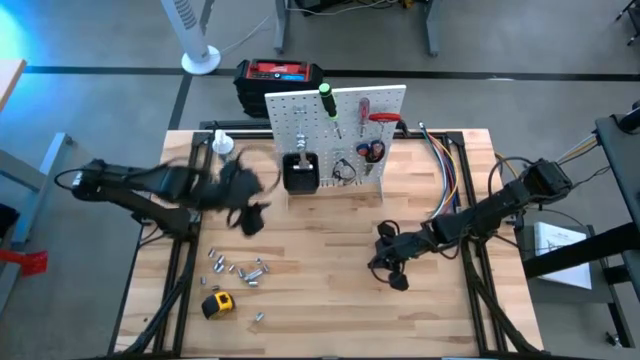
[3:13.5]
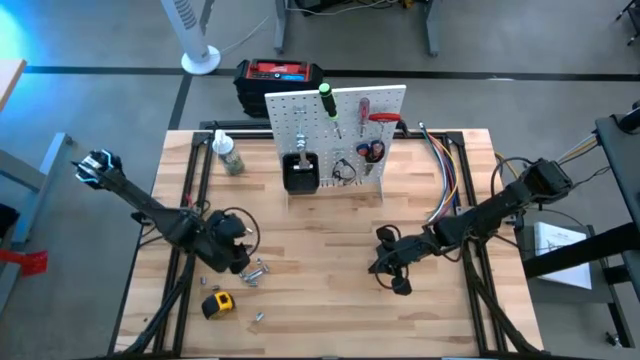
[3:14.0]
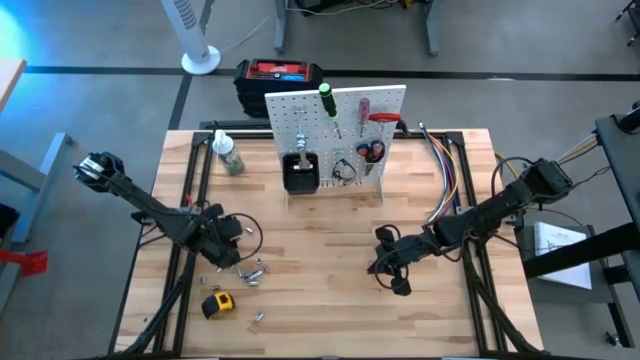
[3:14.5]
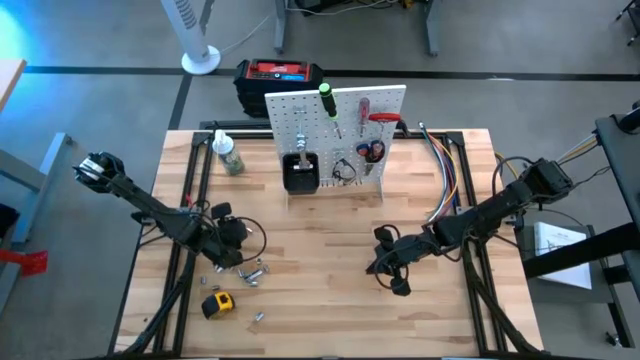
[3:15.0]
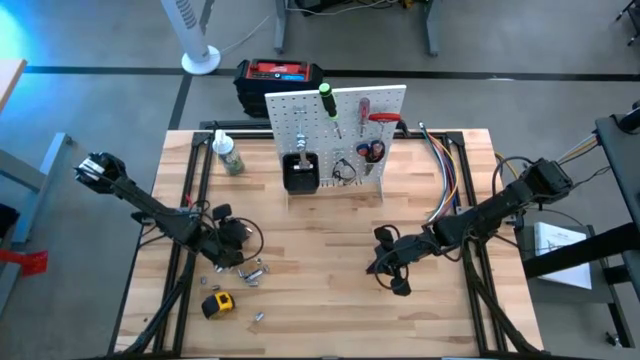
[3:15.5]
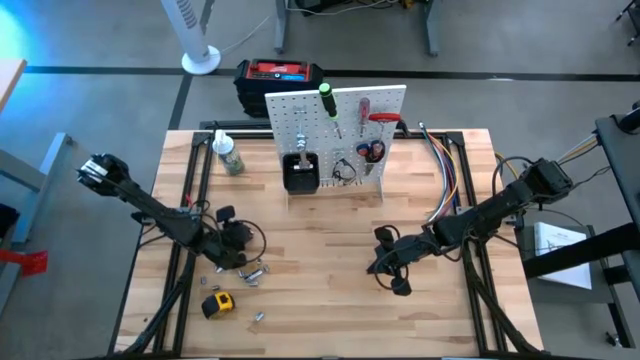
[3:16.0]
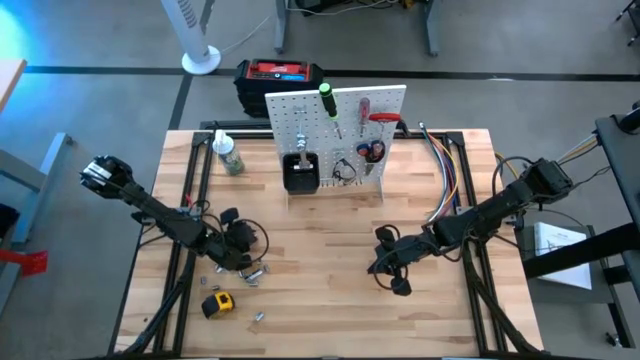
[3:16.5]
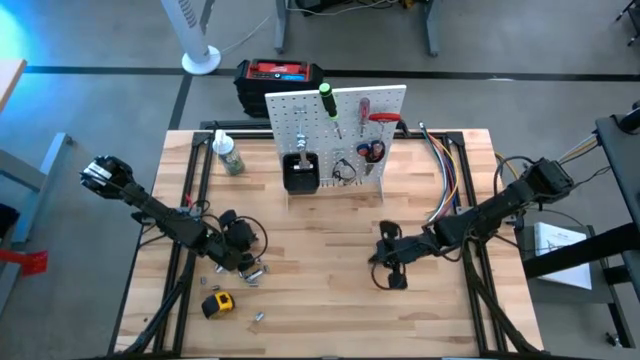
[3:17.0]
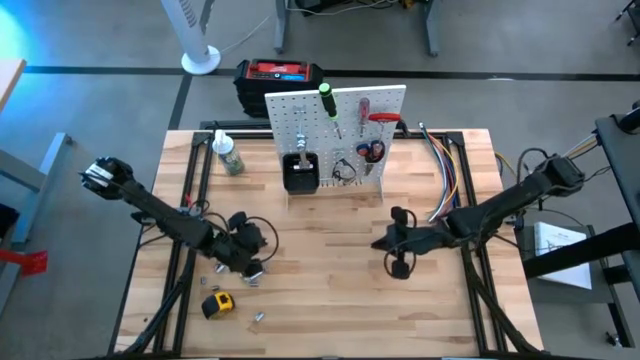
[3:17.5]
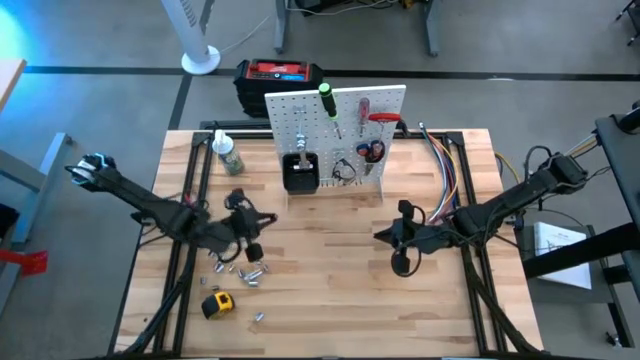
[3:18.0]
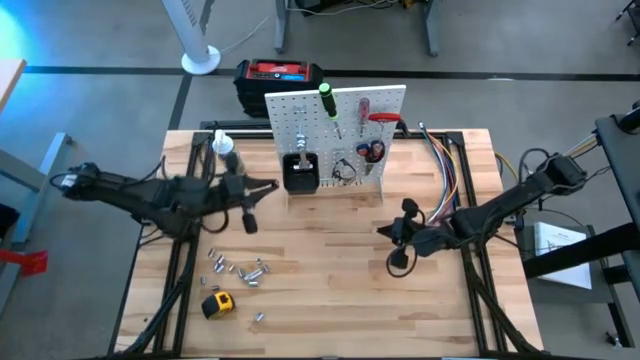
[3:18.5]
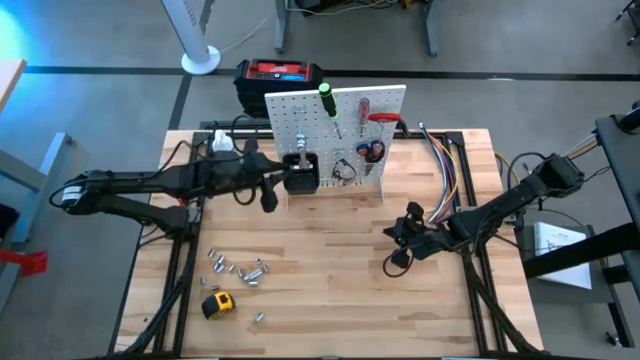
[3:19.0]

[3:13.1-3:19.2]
Task: Hang tools onto peg board
Put the silver socket into the black bin on the pegboard

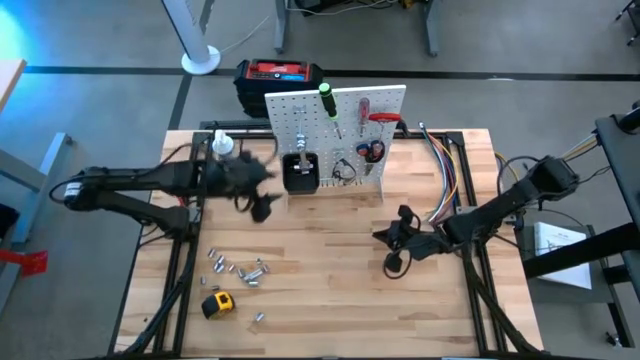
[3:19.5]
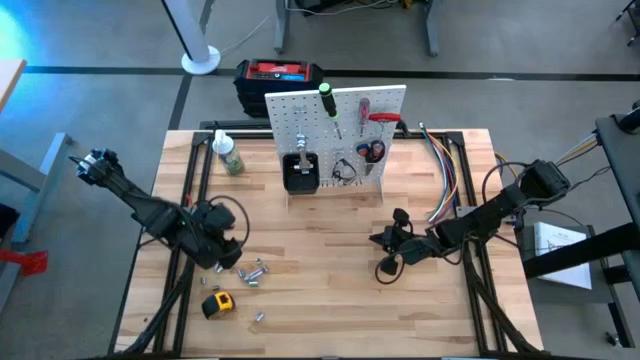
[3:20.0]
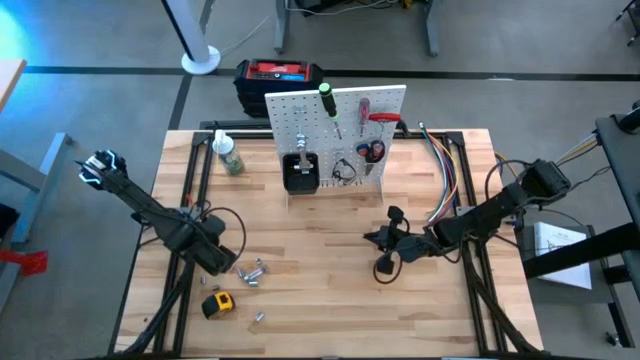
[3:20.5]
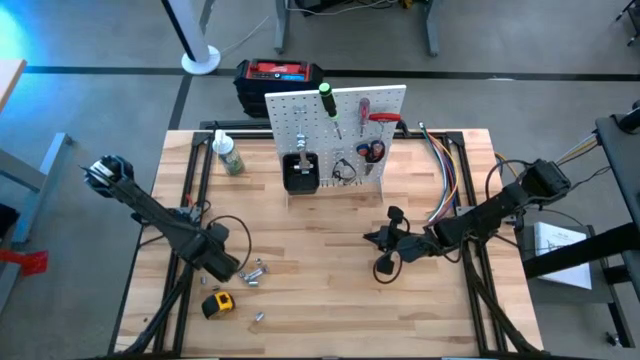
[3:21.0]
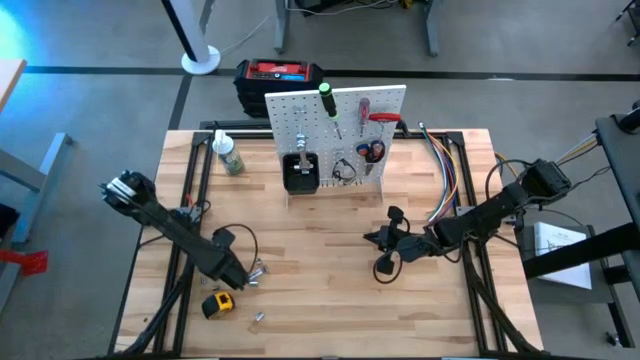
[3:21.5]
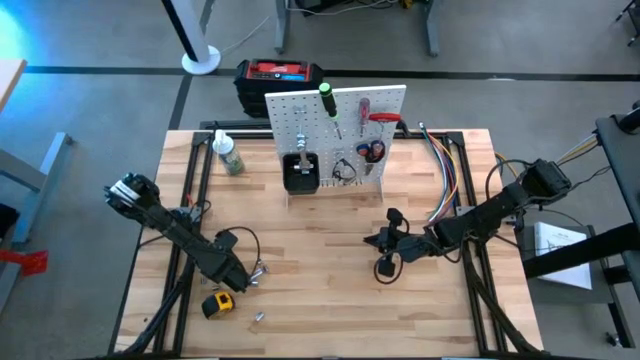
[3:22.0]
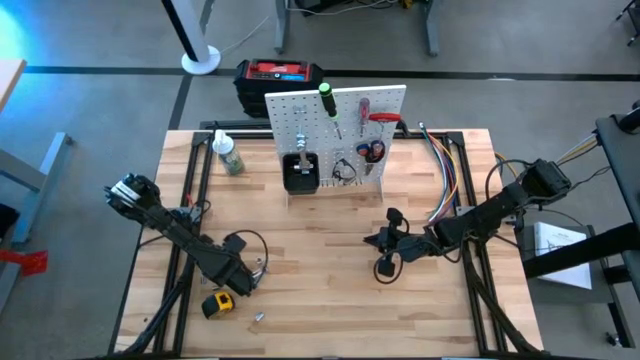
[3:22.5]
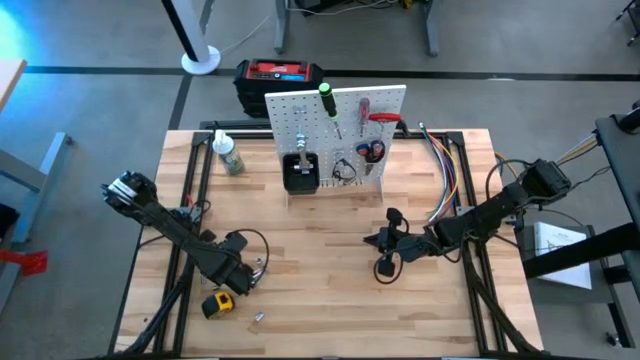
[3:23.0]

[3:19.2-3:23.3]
Put the silver socket into the black bin on the pegboard

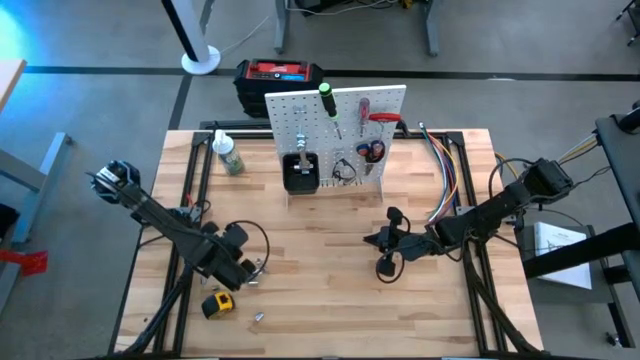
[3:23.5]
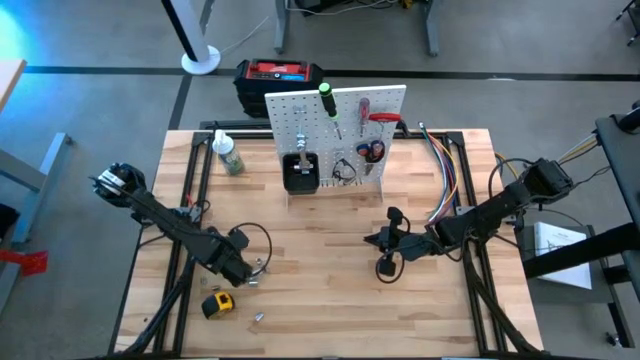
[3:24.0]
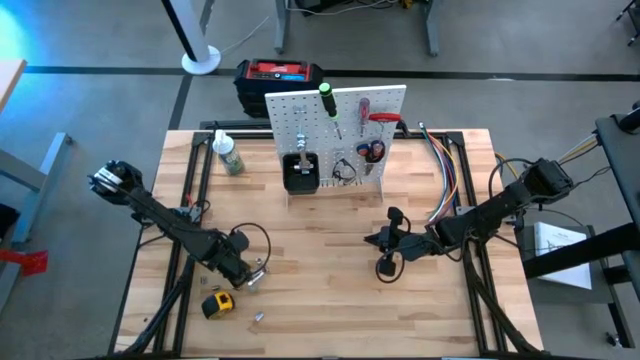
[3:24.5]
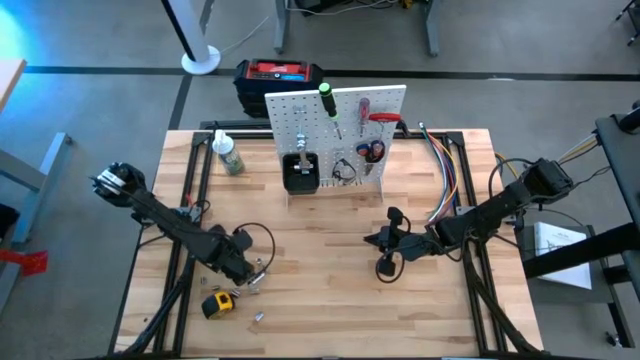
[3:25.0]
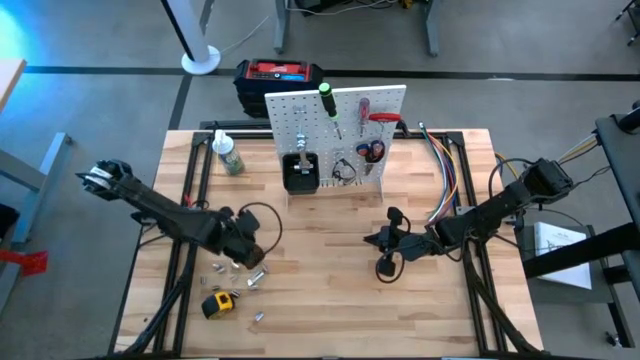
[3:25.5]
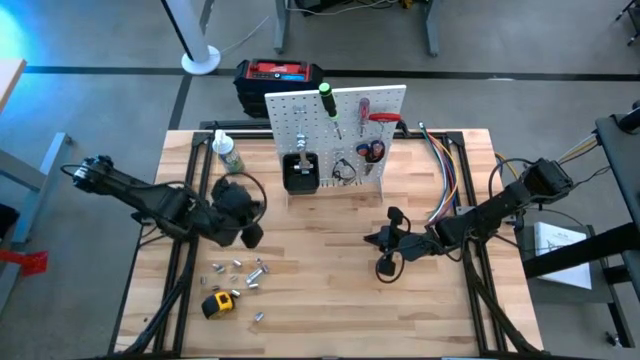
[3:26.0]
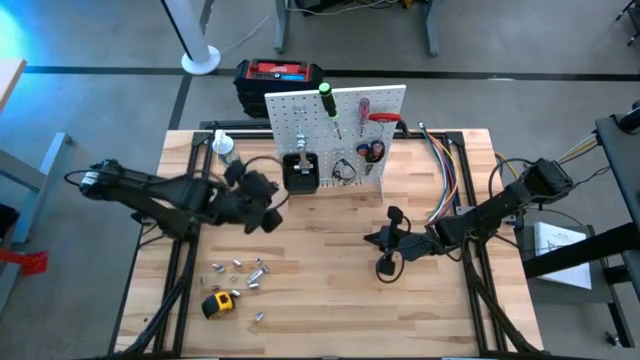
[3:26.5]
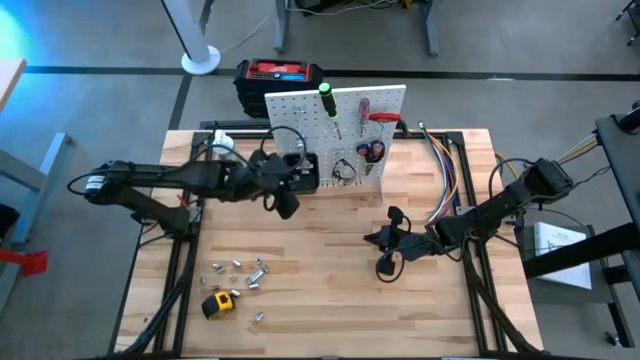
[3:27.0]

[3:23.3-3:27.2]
Put the silver socket into the black bin on the pegboard

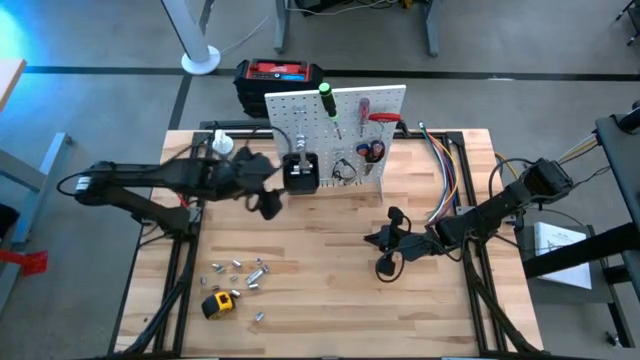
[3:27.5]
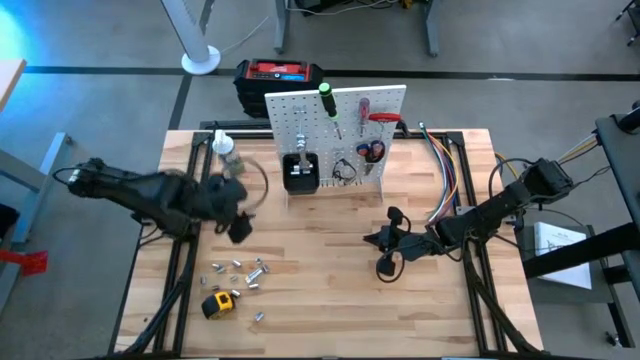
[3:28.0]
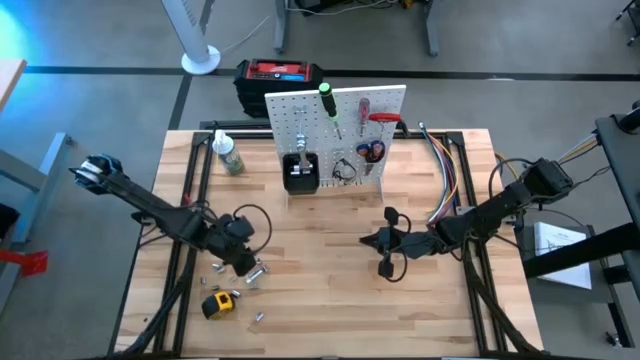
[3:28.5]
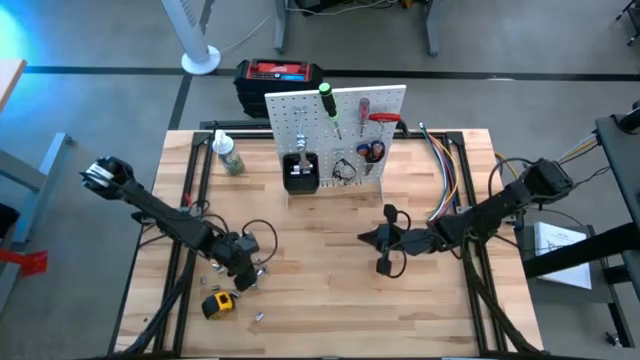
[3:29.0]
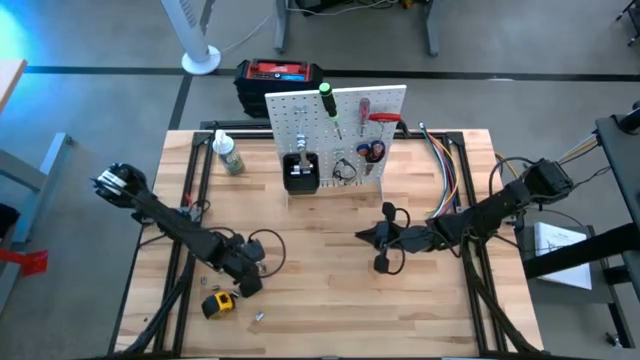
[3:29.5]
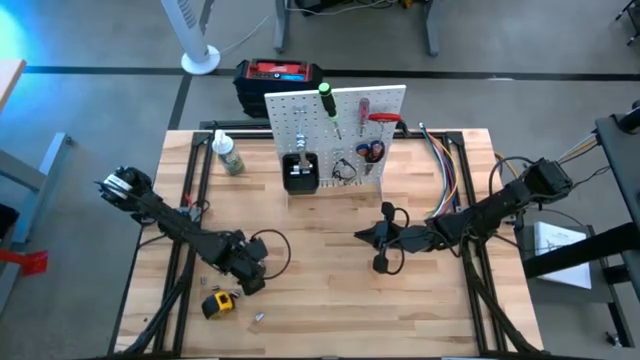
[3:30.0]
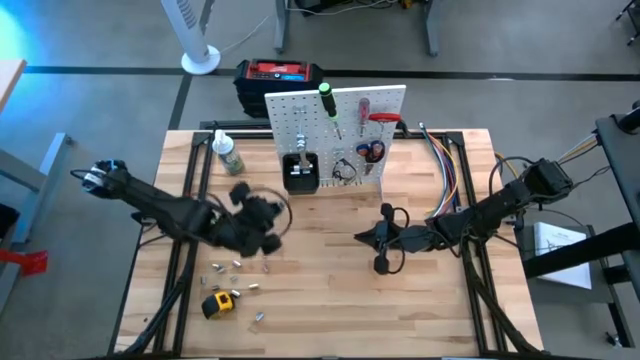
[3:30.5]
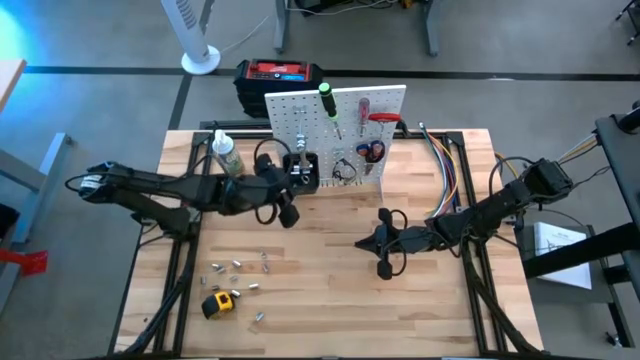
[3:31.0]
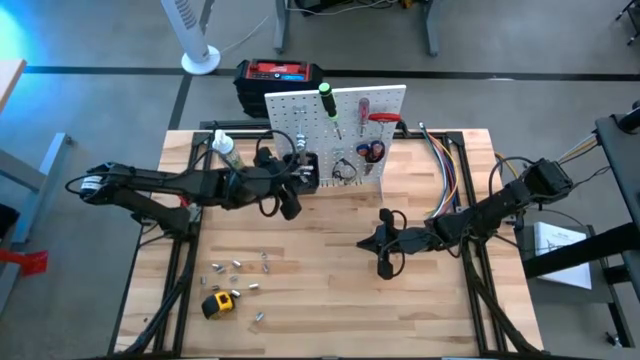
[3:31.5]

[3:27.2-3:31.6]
Put the silver socket into the black bin on the pegboard

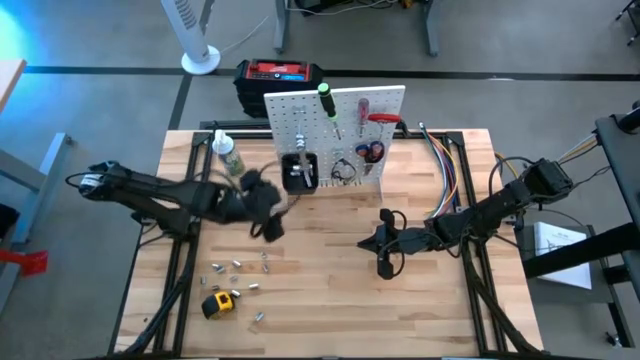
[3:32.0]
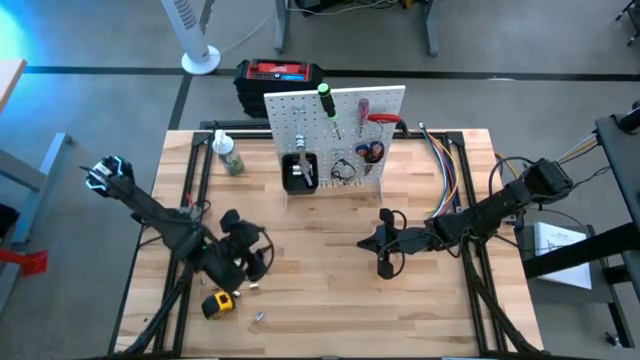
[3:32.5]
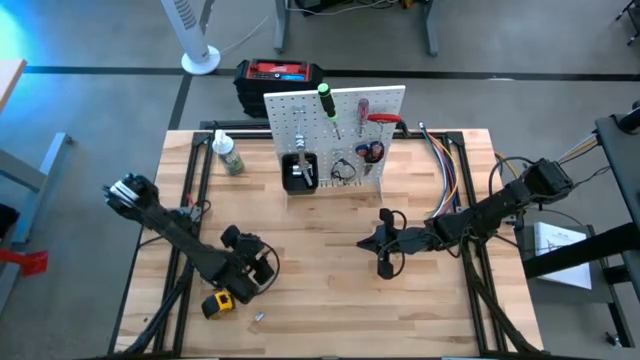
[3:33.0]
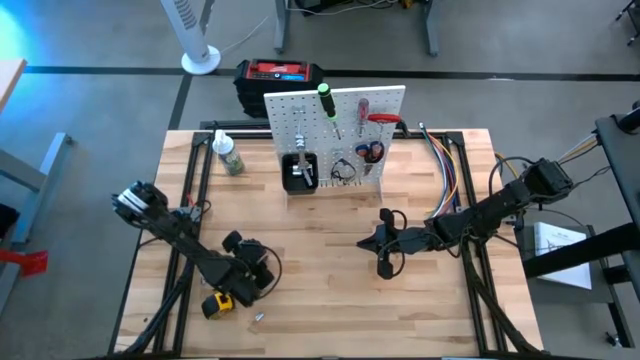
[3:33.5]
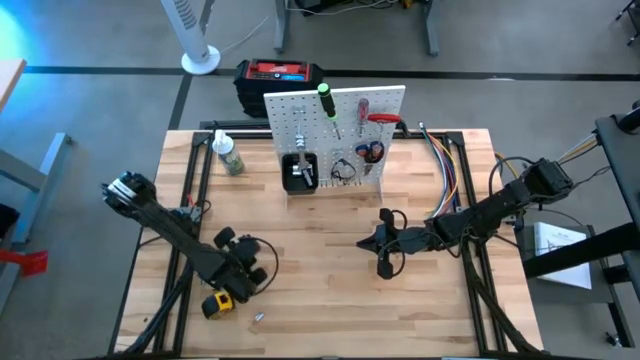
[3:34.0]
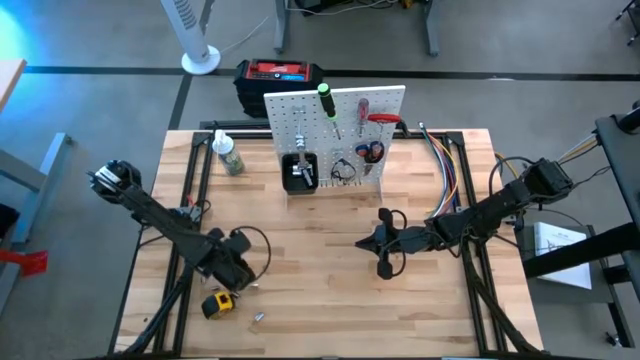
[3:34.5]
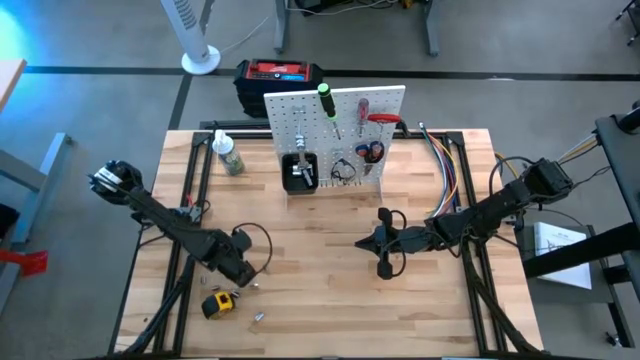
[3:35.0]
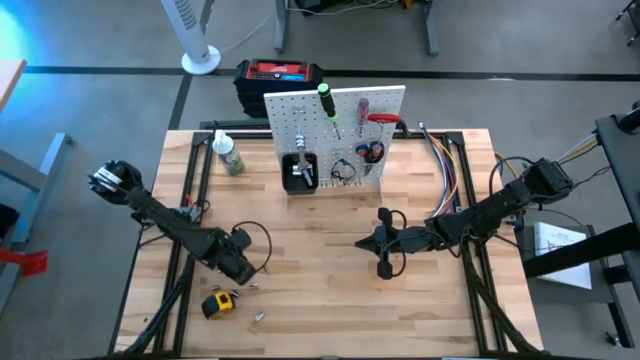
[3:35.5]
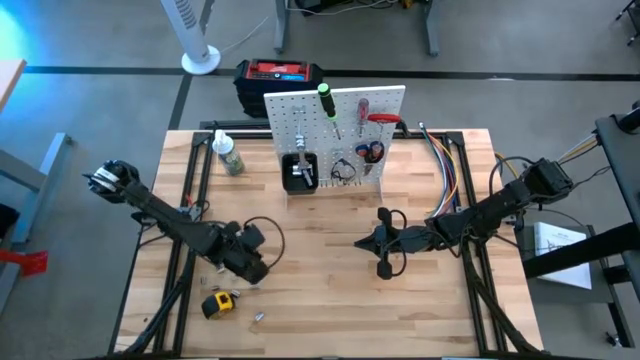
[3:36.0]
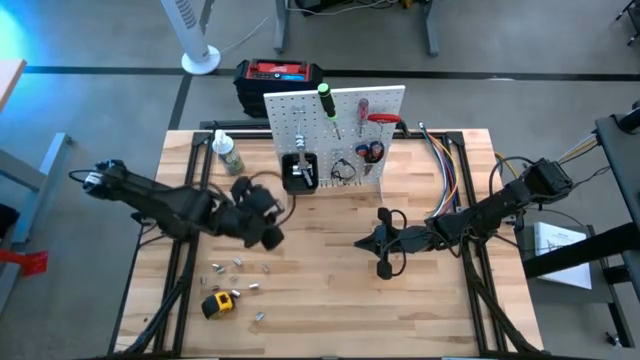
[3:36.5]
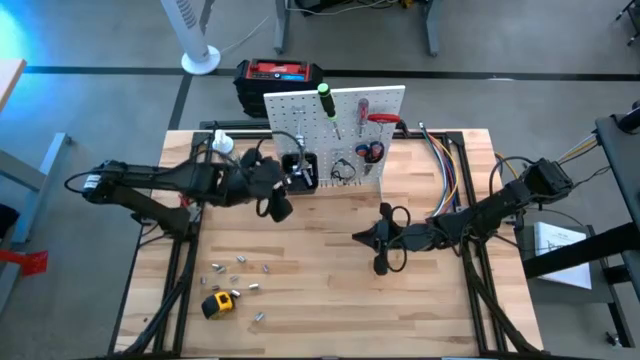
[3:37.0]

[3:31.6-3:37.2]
Put the silver socket into the black bin on the pegboard
